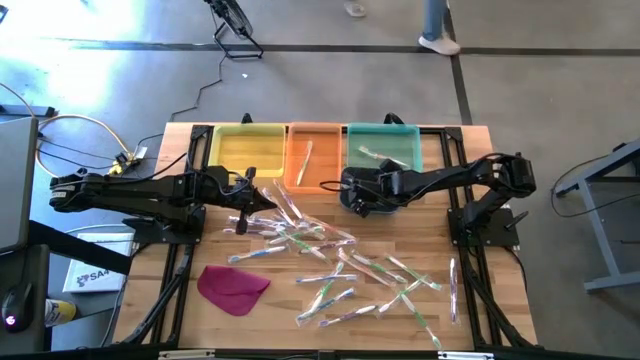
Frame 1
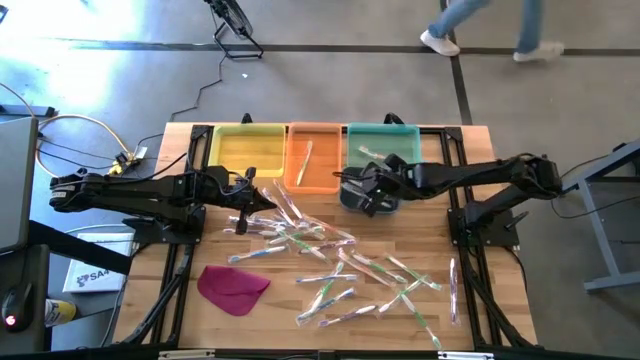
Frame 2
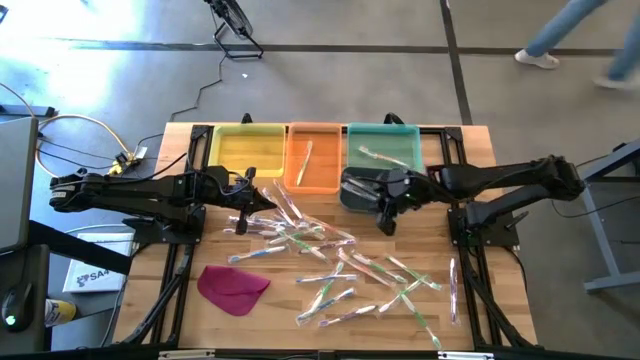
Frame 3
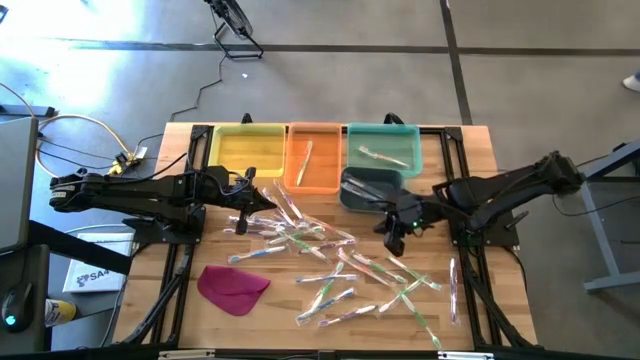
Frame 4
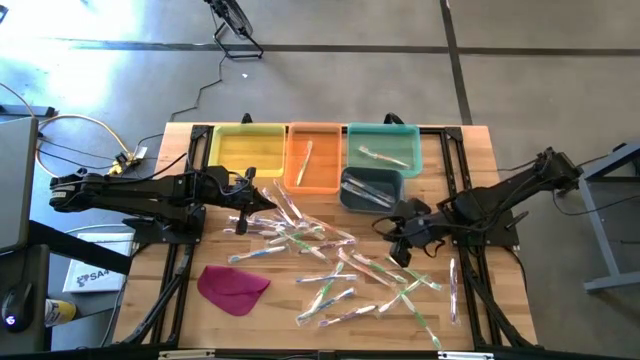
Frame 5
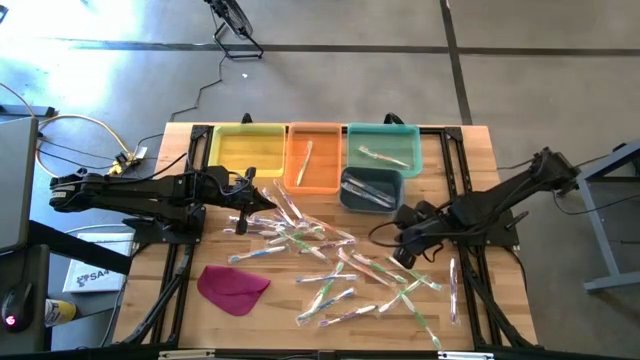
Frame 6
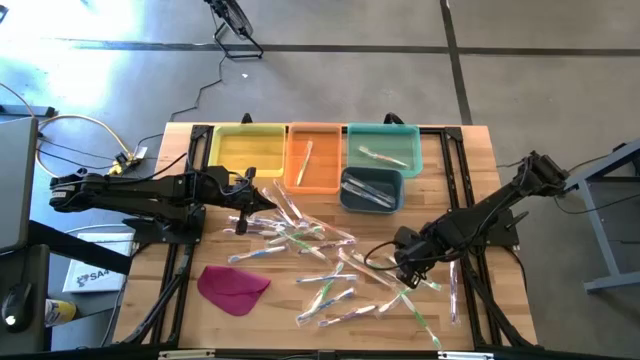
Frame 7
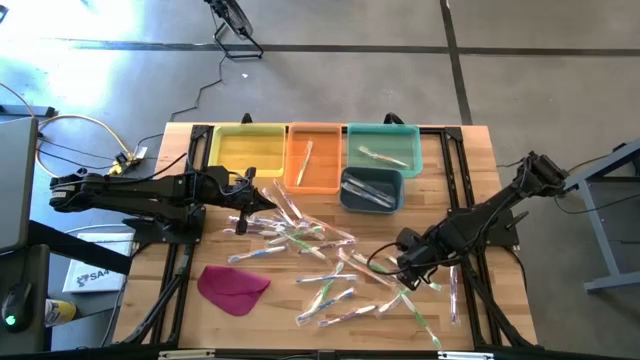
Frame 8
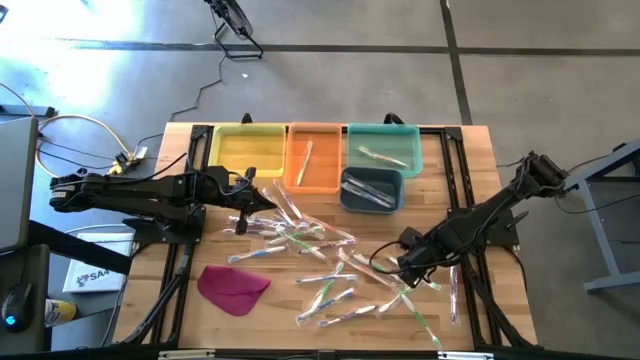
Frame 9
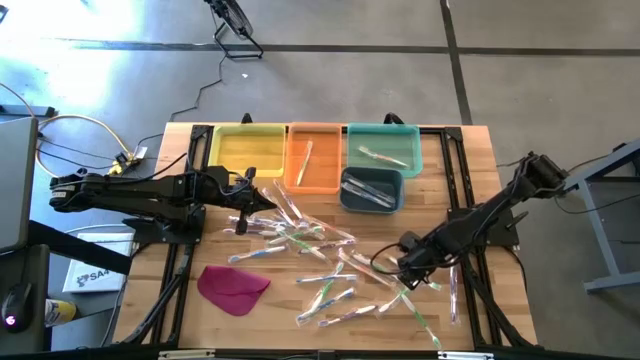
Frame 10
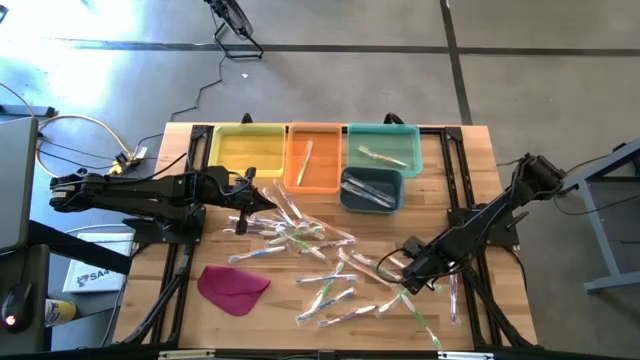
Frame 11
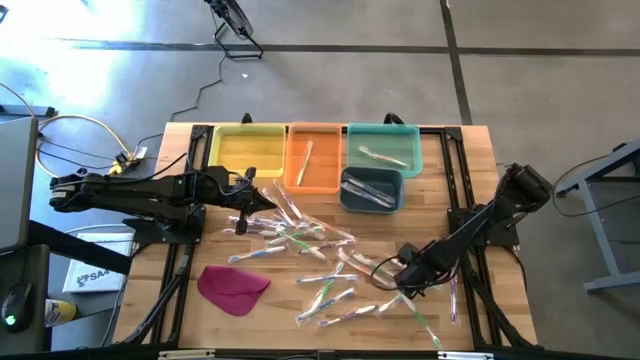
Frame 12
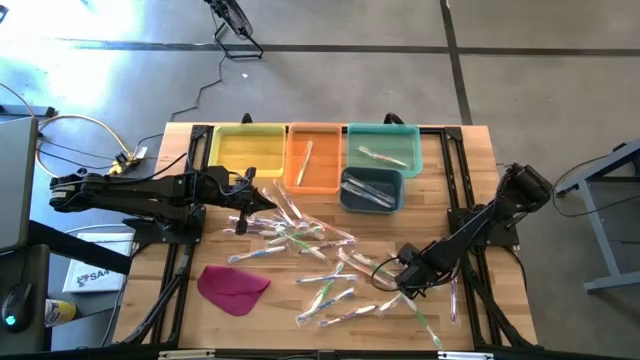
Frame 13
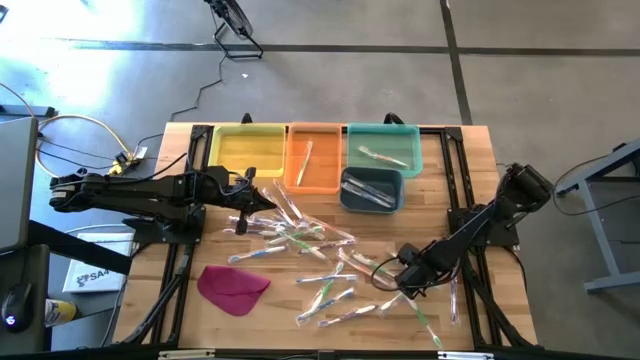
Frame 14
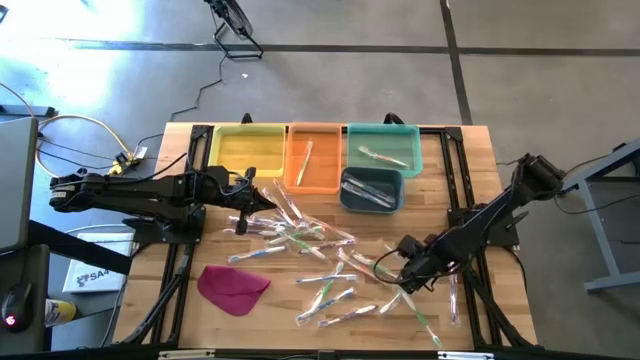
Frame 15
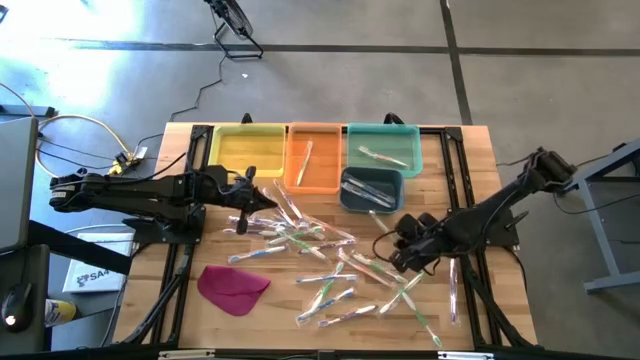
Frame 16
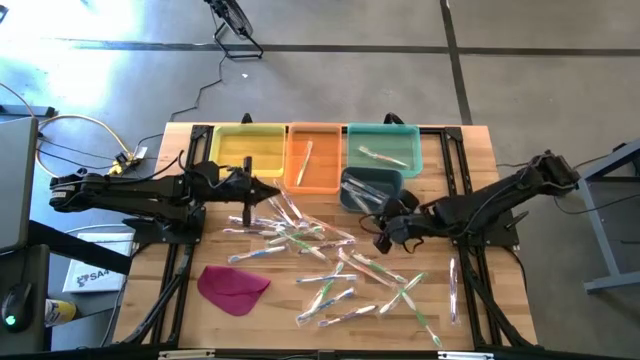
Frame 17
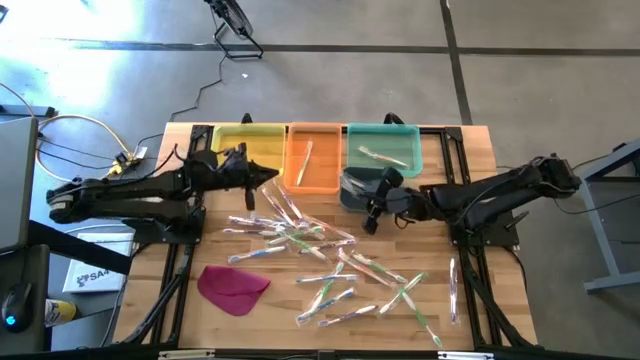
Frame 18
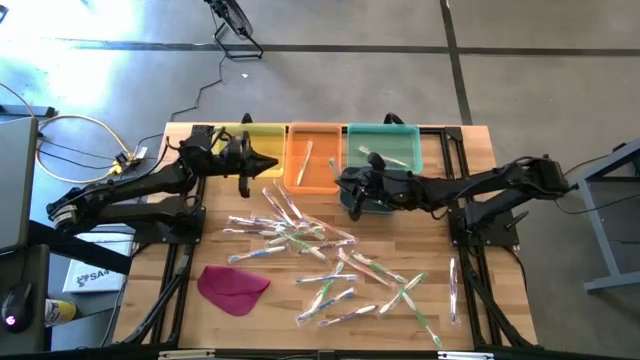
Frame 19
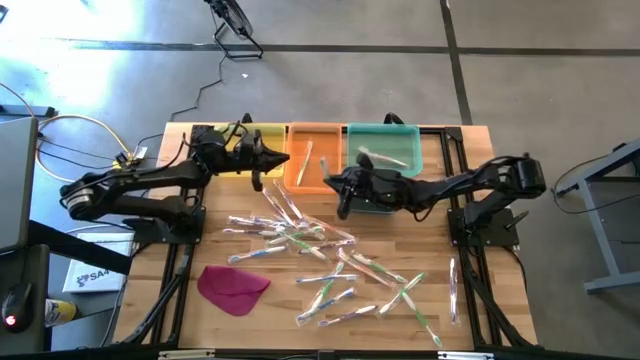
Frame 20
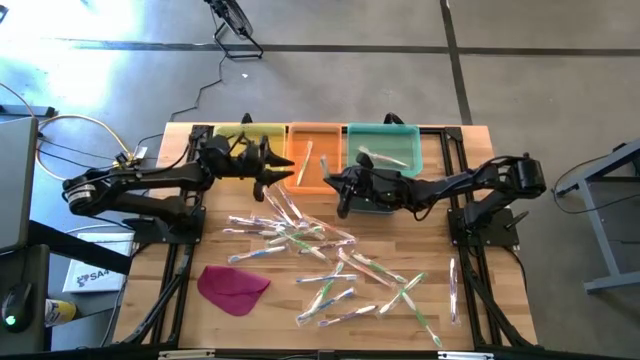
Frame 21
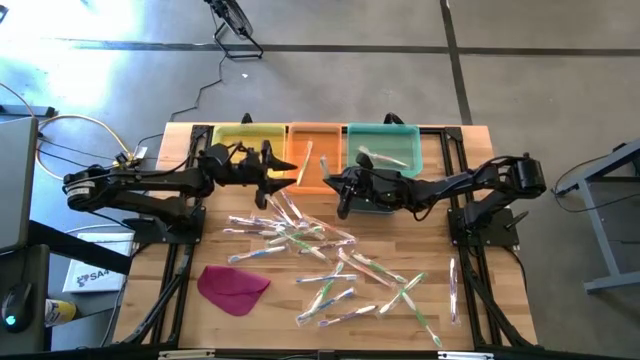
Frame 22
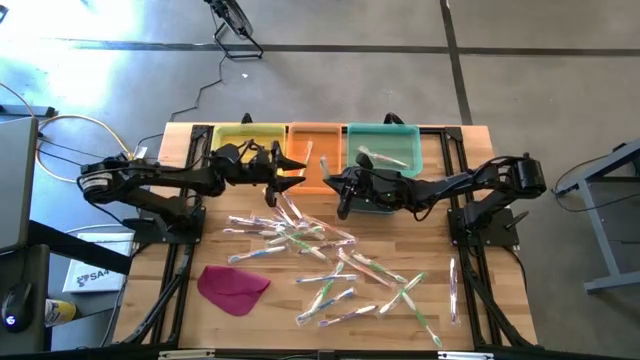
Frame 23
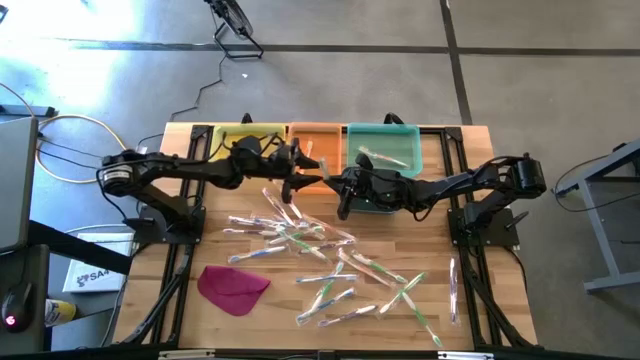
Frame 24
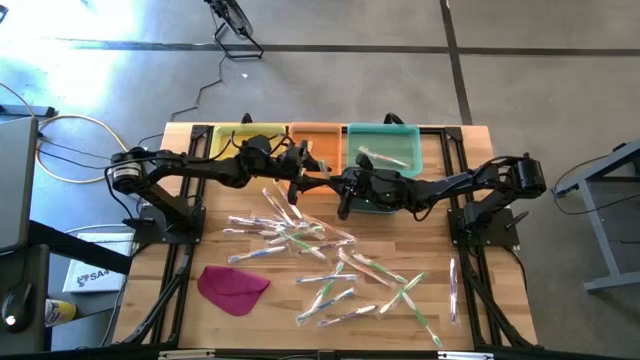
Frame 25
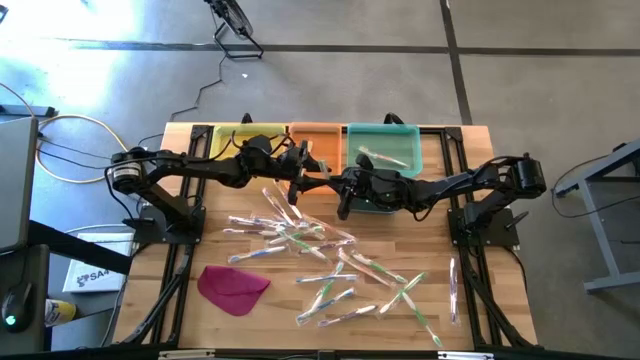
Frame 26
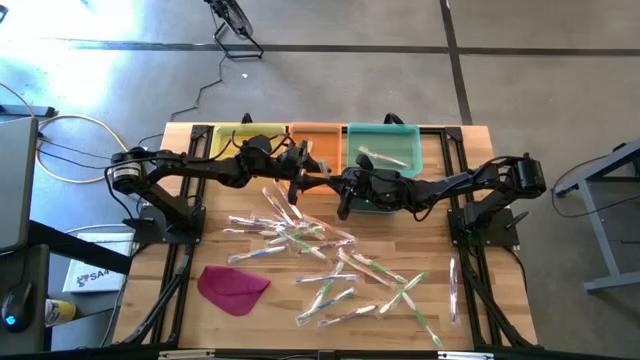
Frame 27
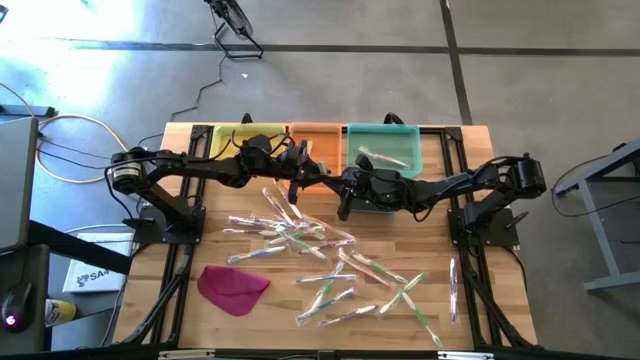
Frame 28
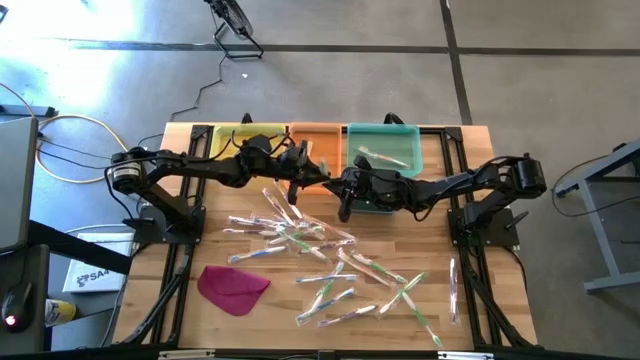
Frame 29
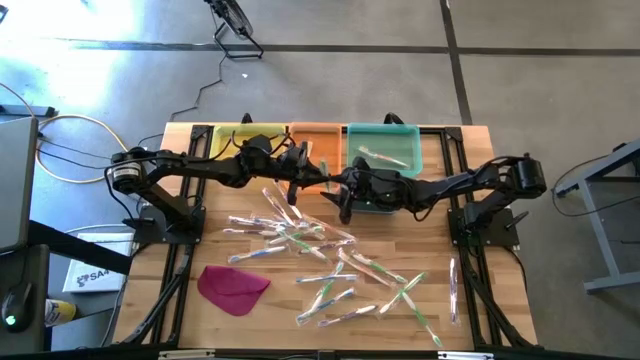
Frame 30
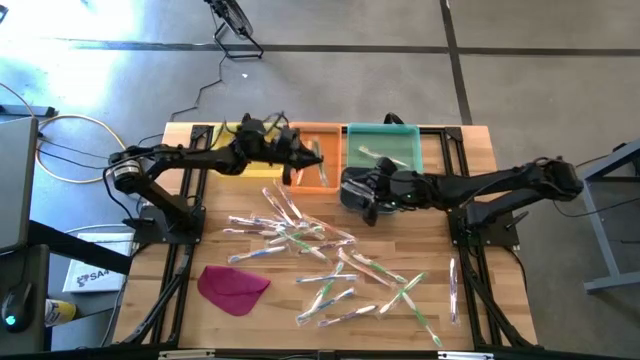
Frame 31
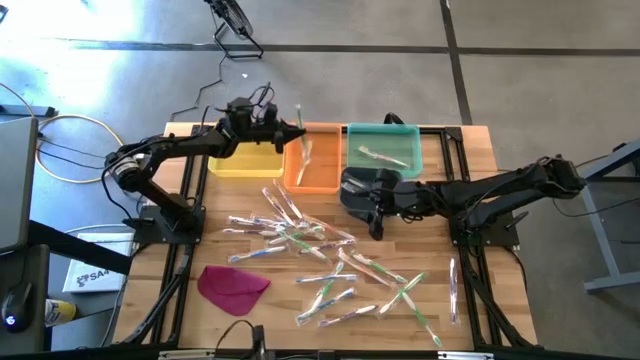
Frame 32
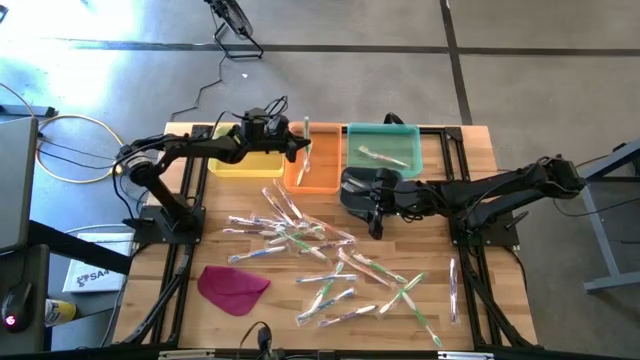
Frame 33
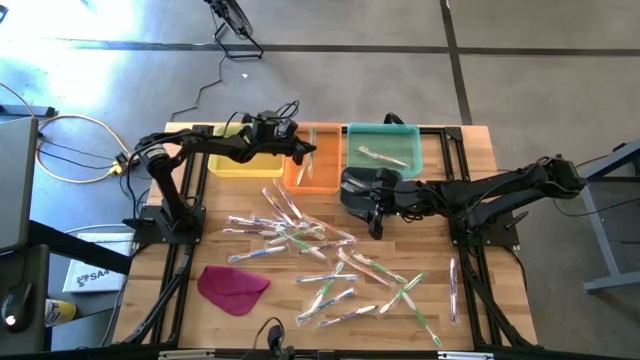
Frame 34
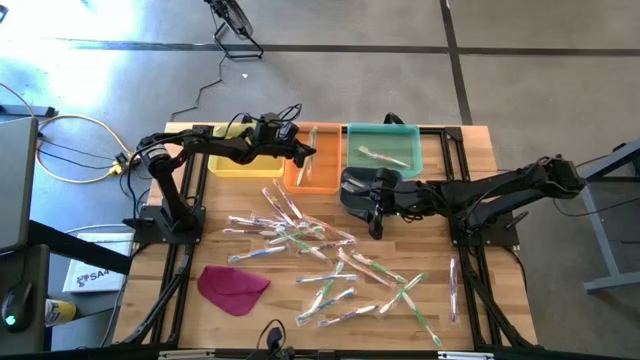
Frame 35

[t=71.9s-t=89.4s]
Task: Pick & Place Toothbrushes
Put the green toothbrush into the orange bin

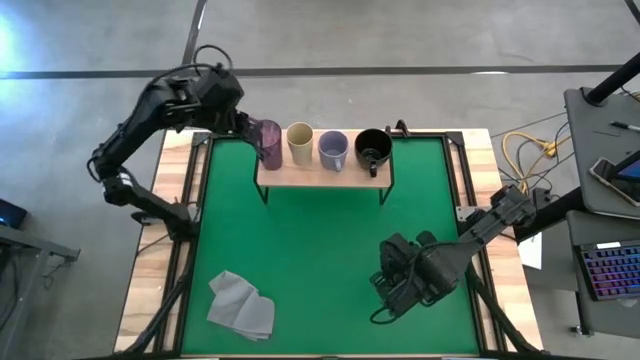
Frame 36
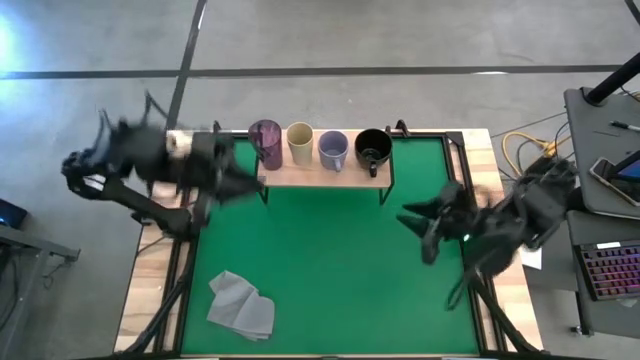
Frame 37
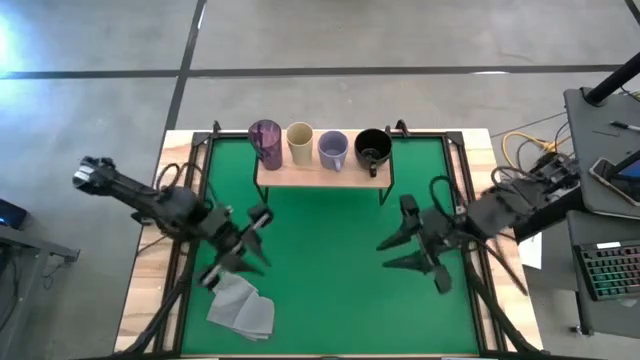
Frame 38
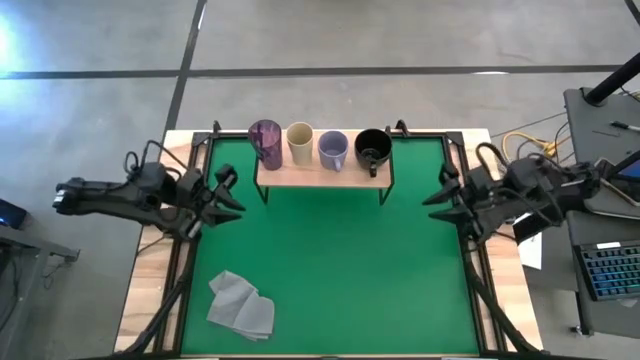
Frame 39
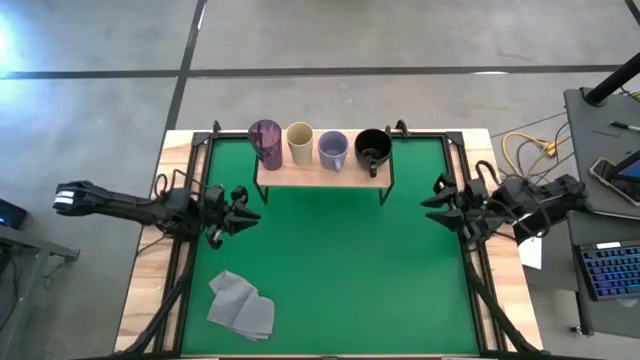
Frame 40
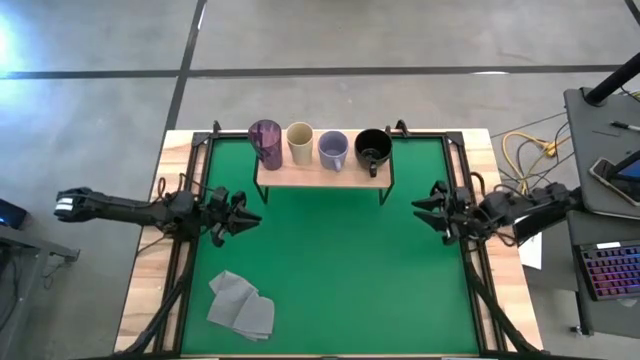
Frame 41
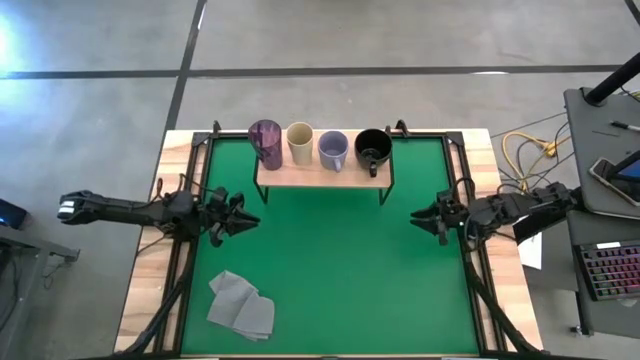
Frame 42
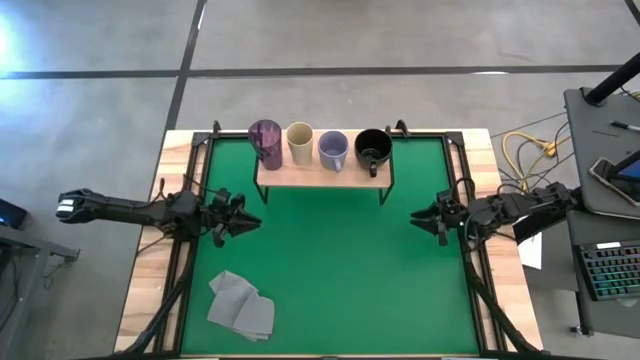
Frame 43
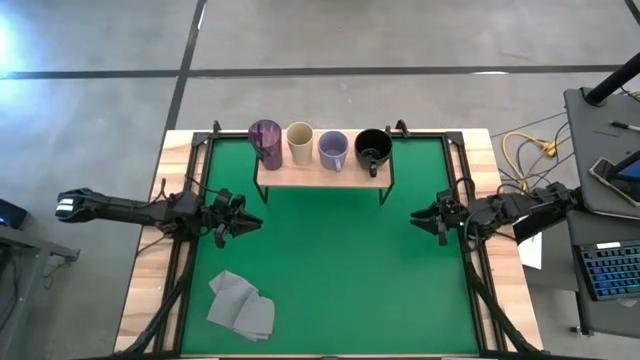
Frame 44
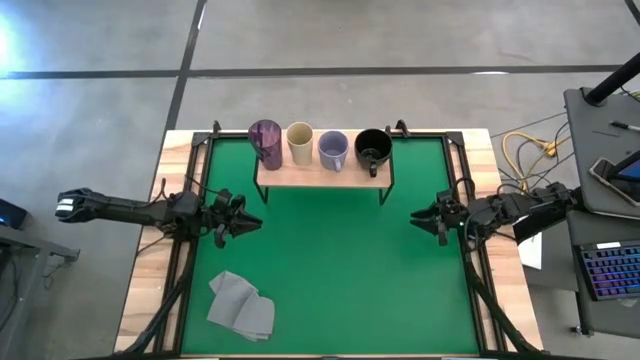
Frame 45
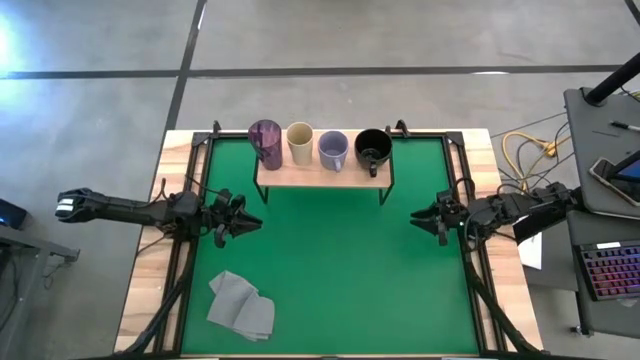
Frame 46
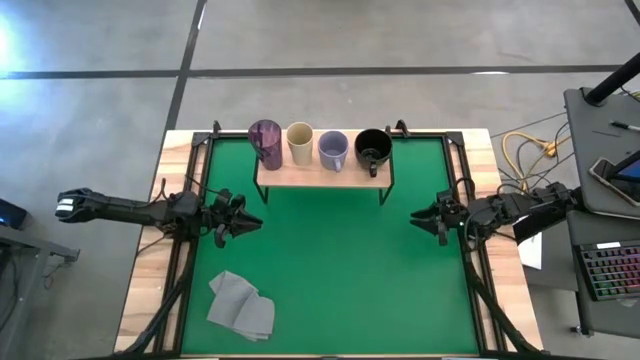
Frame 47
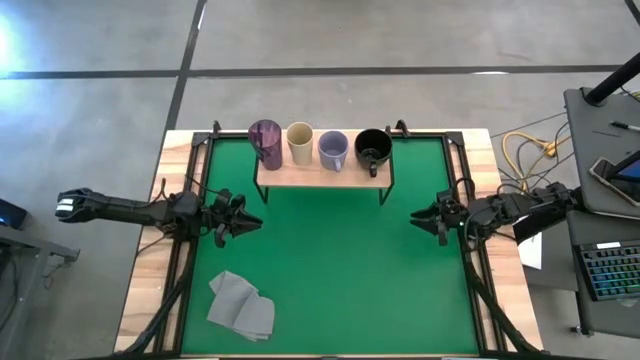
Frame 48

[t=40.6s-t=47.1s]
Task: Stack small to large cups/mugs on shelf
Return to Home Position
